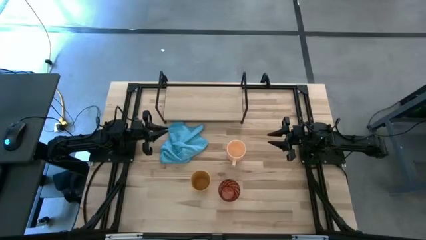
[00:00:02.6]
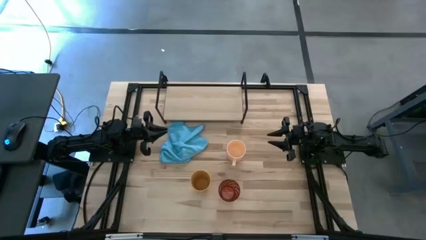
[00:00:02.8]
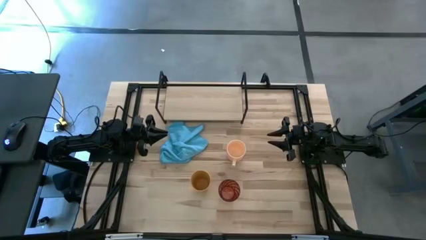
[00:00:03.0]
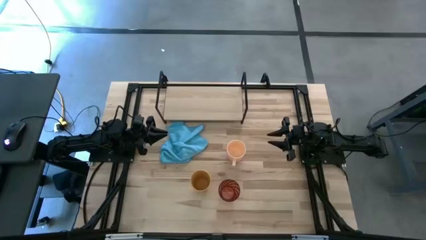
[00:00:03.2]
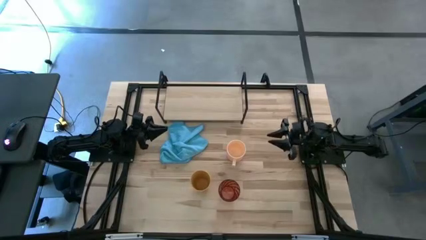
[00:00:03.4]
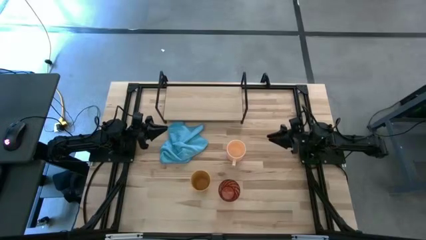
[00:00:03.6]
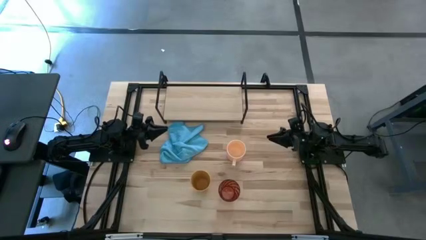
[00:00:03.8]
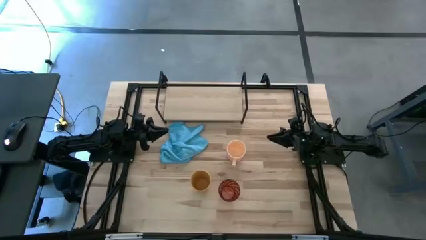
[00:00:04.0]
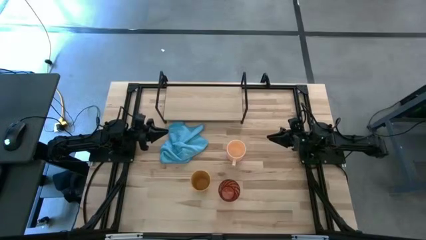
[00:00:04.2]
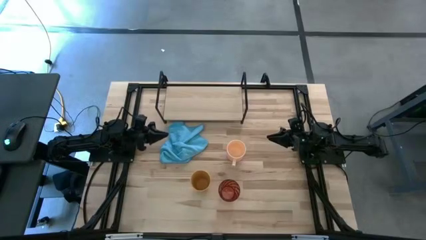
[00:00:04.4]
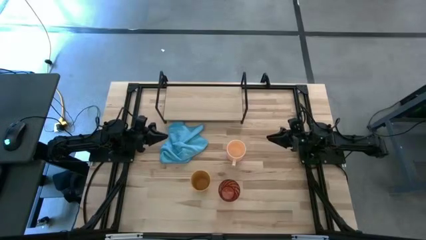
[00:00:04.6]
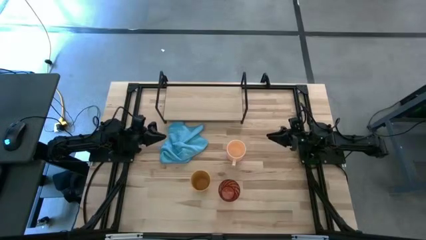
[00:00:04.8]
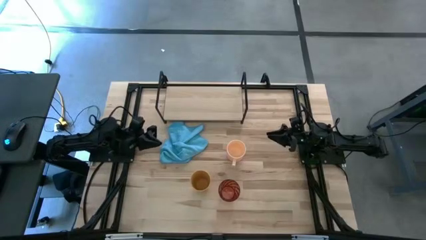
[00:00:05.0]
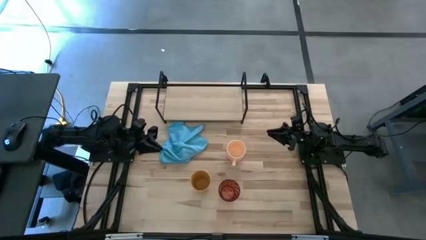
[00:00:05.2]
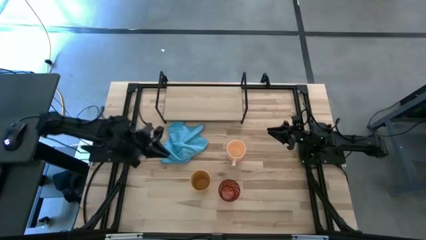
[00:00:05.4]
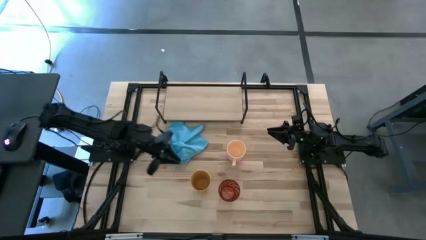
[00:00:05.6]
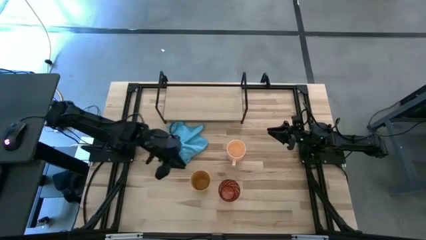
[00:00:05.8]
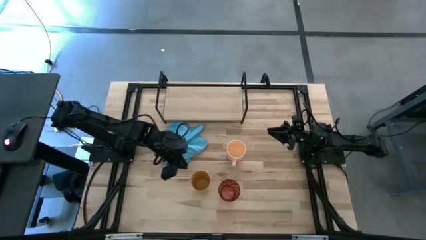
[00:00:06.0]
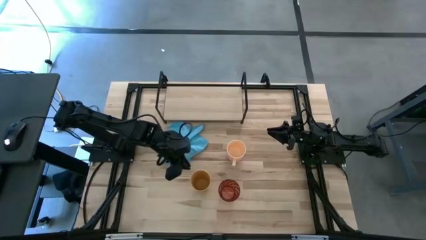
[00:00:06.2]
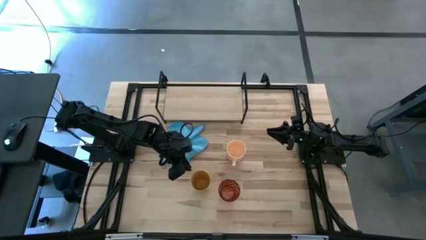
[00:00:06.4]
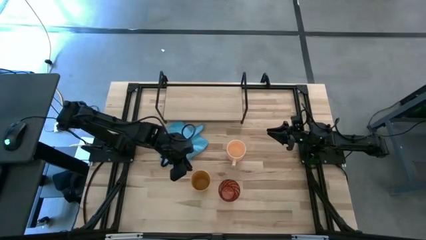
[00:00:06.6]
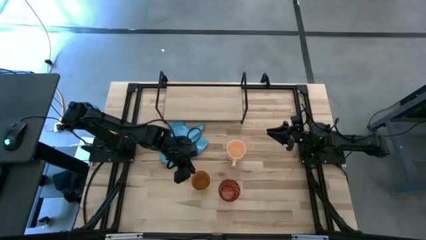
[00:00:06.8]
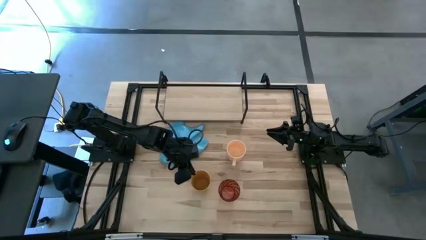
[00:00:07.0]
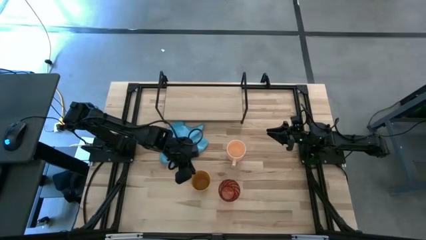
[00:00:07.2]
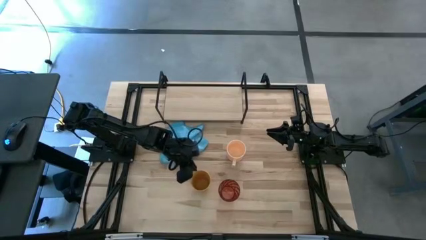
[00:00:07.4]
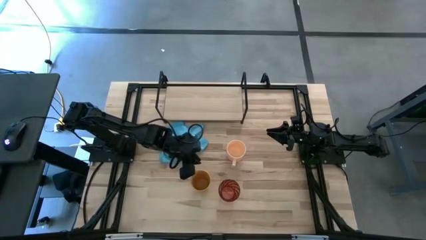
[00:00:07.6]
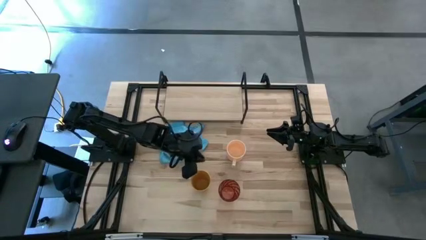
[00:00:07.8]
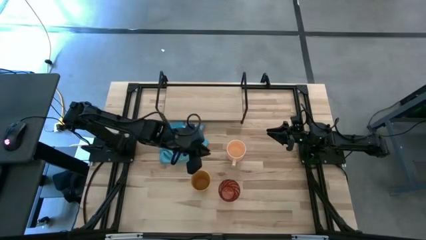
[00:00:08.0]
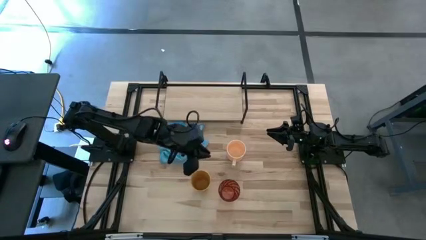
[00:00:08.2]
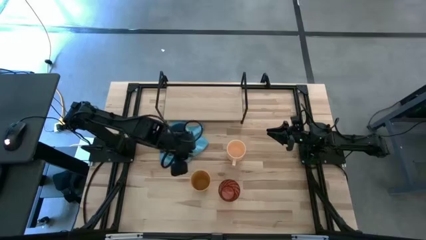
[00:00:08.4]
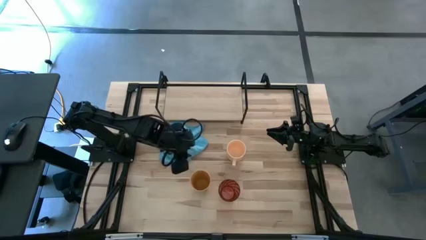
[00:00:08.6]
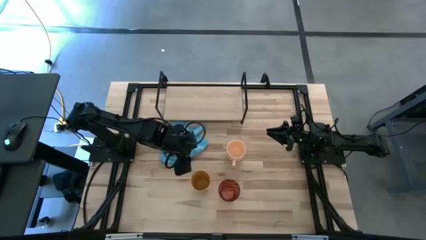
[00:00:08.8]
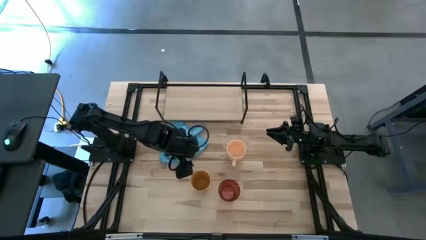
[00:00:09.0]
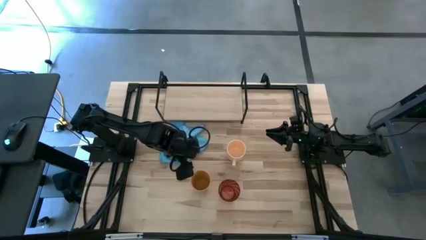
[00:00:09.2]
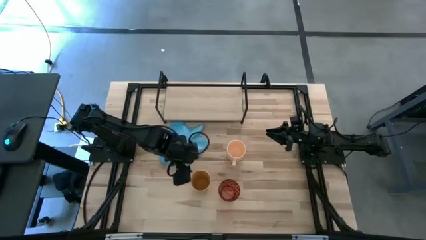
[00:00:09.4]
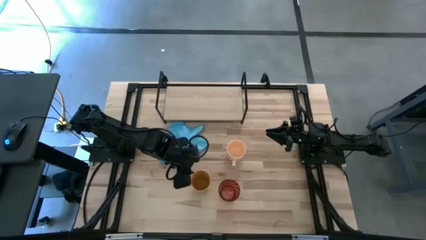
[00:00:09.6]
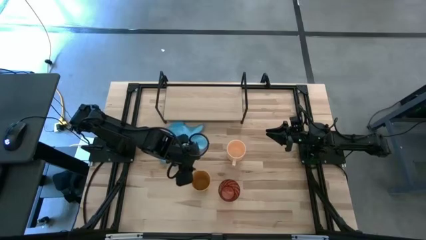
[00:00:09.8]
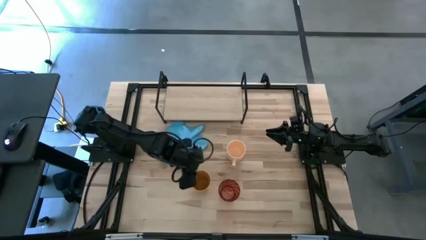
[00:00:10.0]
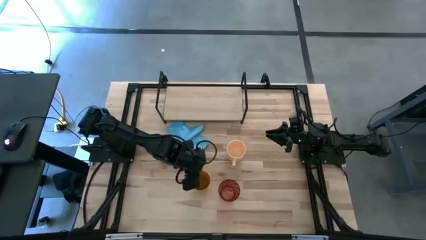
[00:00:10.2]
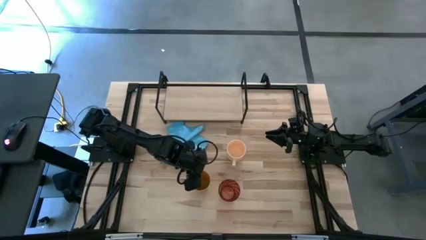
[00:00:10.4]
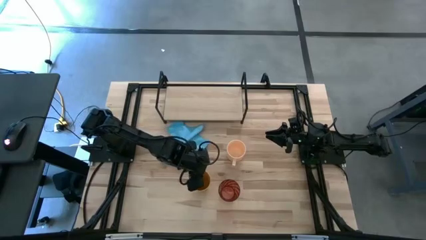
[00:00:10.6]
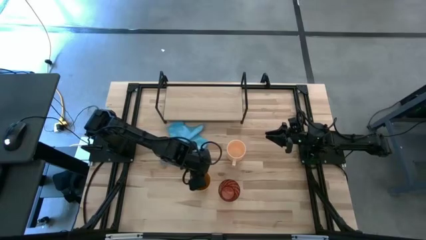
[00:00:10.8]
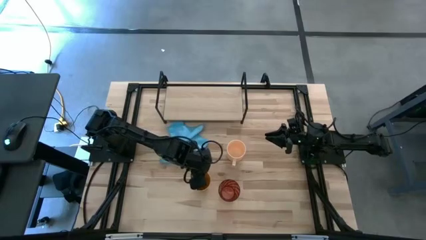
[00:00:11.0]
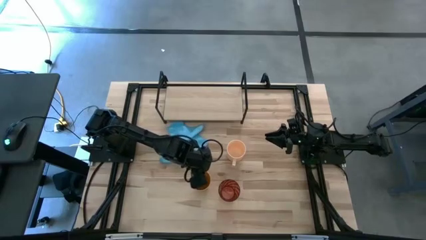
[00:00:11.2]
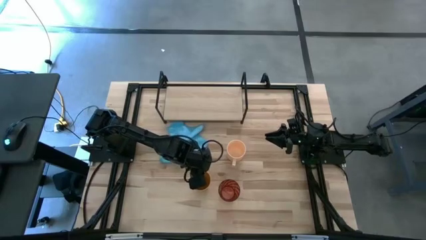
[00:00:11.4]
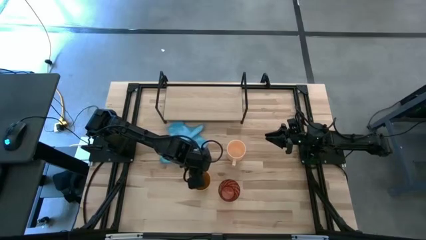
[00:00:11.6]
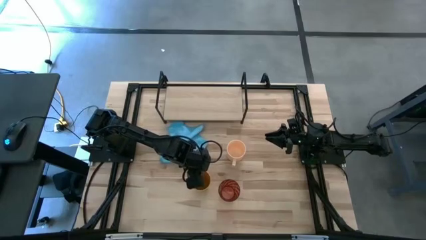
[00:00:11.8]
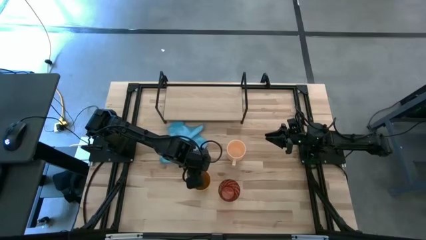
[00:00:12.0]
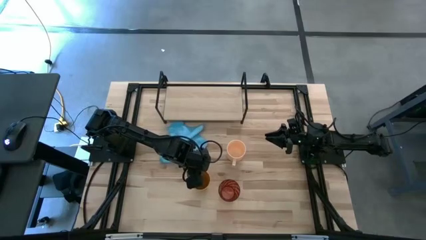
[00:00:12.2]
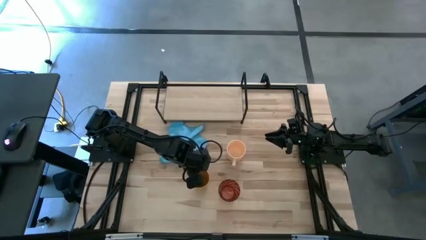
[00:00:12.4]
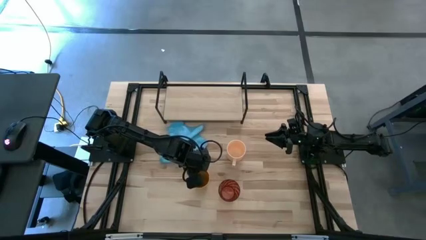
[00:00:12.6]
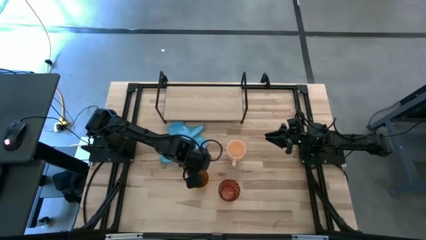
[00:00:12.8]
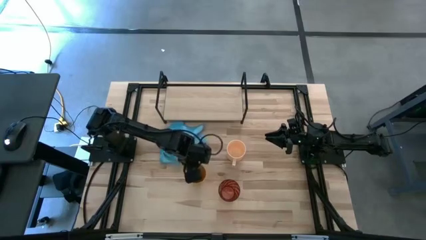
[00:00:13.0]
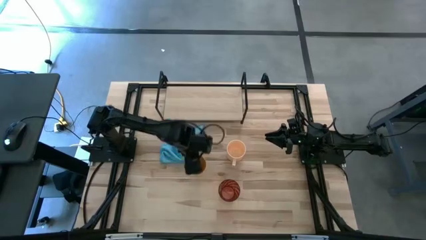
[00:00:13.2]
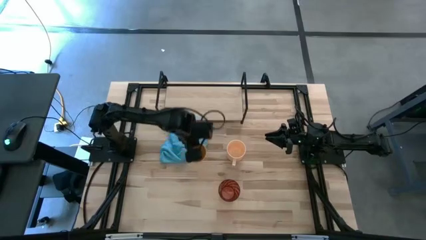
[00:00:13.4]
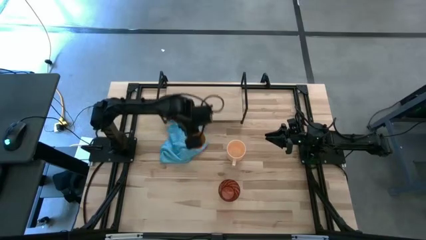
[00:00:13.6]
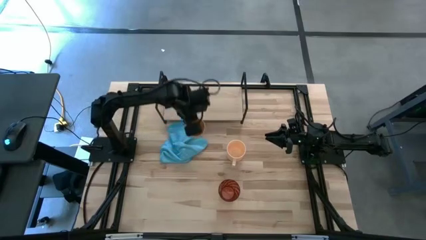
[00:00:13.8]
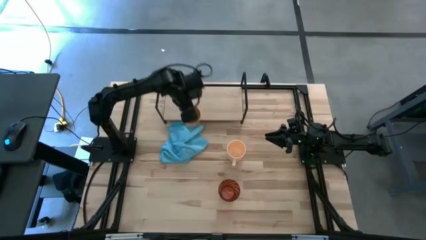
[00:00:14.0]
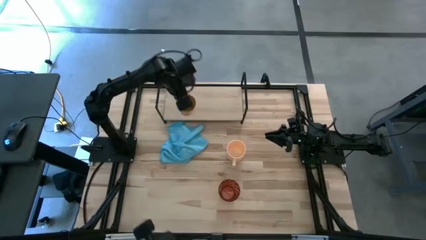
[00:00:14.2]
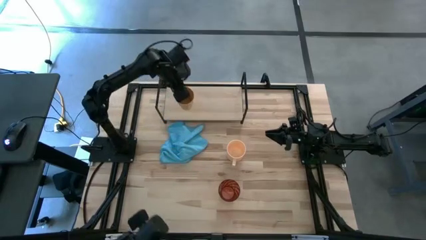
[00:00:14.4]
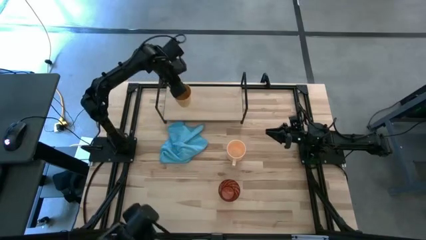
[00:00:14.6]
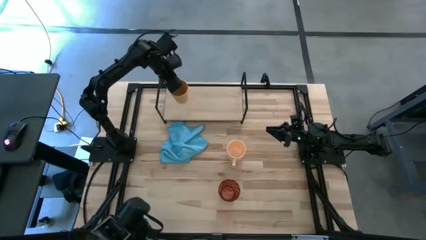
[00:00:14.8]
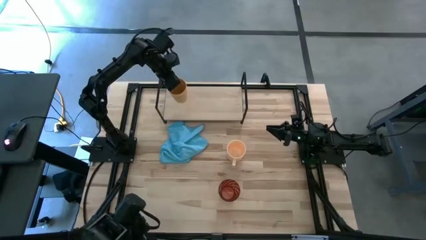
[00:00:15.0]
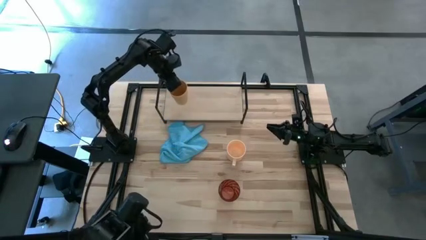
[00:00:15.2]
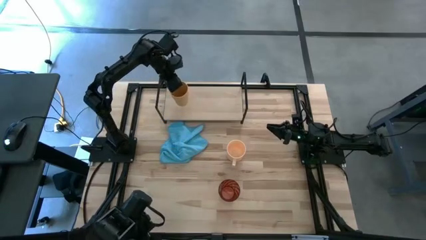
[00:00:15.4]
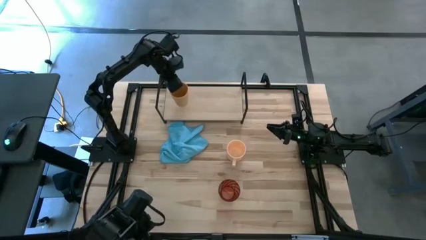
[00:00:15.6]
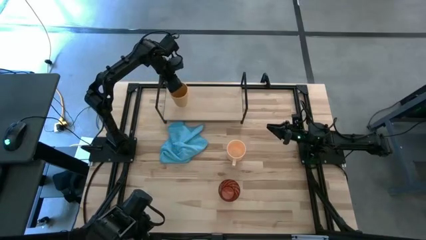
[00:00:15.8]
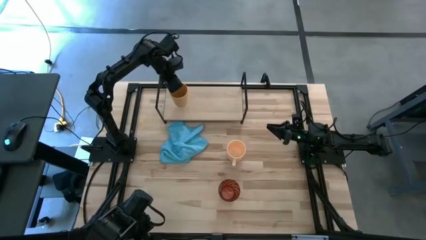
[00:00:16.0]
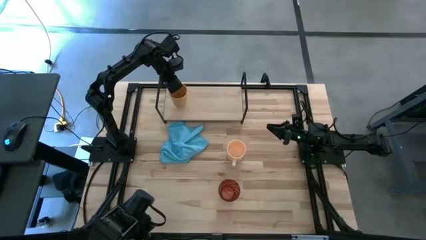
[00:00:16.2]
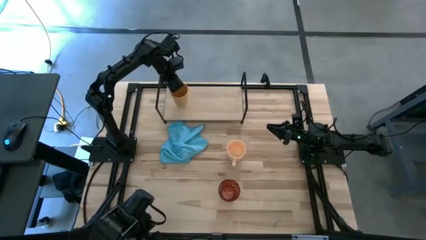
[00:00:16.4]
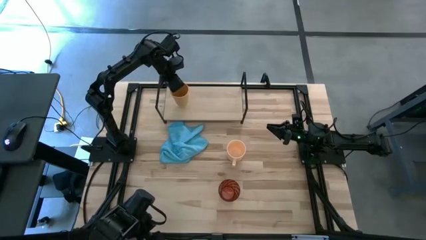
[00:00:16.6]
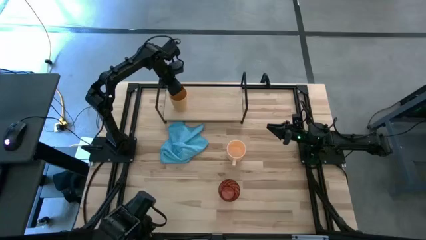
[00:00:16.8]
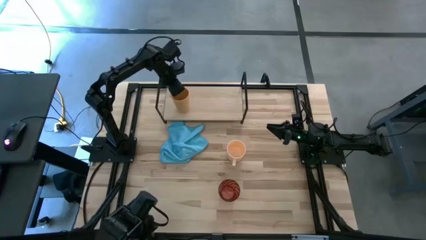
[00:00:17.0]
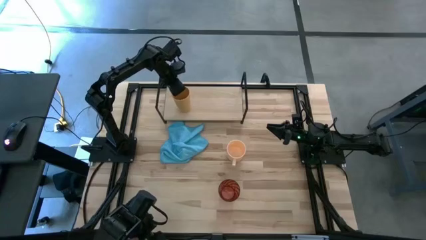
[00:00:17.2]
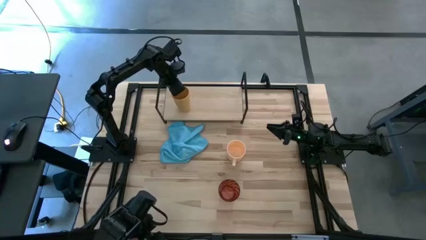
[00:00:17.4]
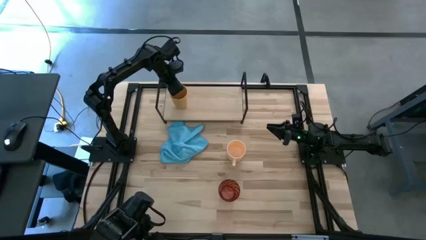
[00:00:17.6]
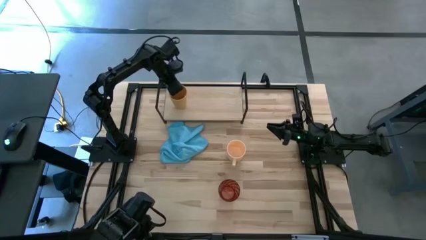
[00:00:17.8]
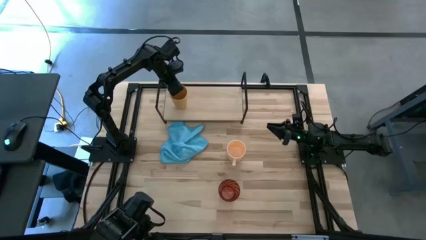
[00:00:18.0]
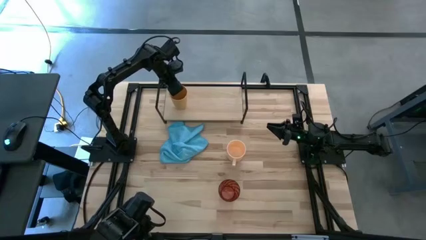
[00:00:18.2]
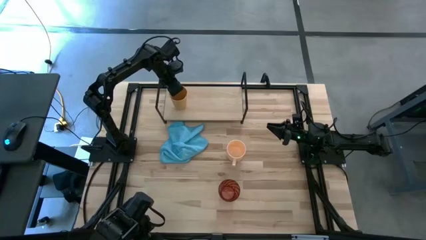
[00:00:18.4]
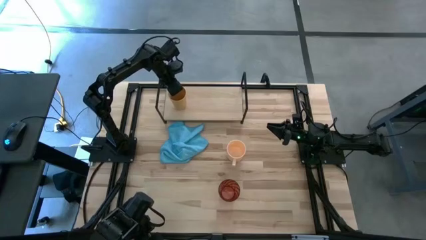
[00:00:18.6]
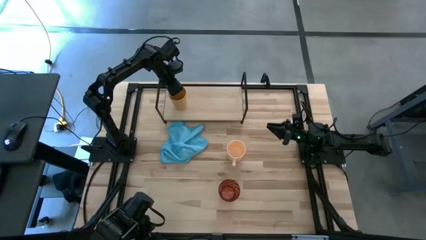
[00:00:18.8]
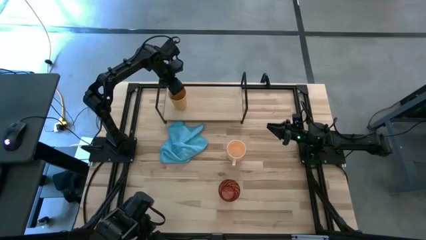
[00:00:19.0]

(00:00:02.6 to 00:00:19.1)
Task: Stack small to large cups/mugs on shelf
Put the yellow cup on the shelf
